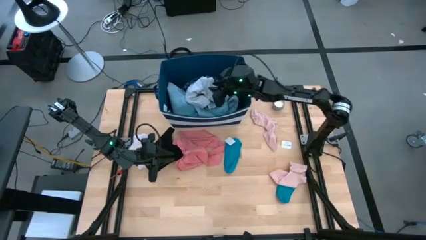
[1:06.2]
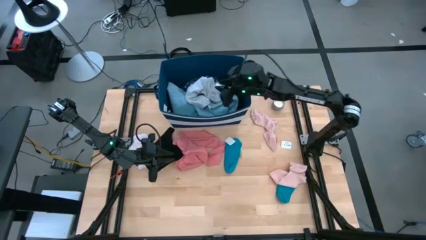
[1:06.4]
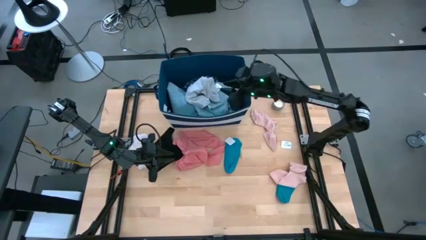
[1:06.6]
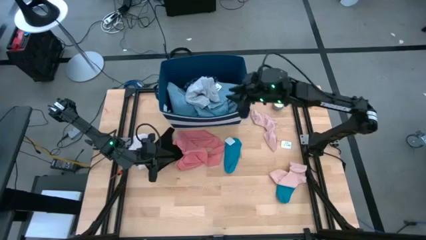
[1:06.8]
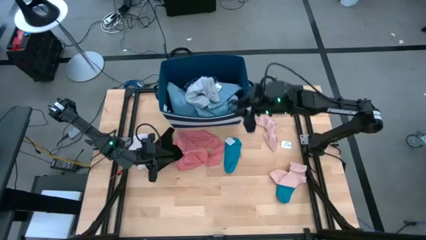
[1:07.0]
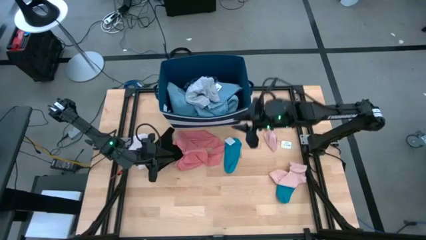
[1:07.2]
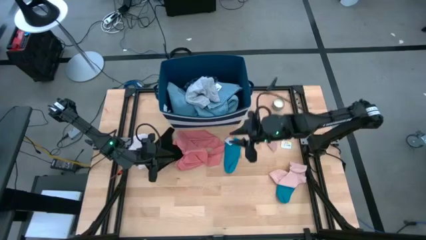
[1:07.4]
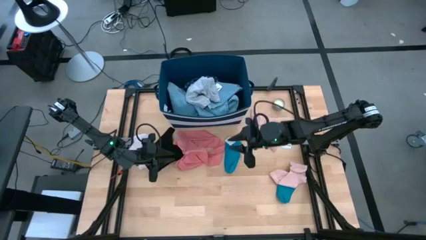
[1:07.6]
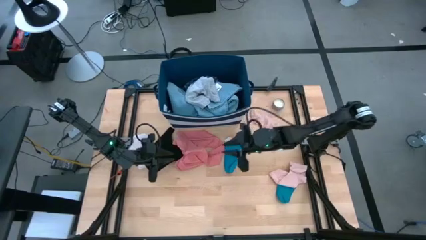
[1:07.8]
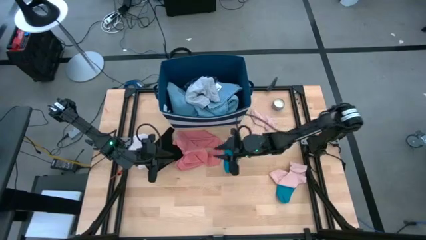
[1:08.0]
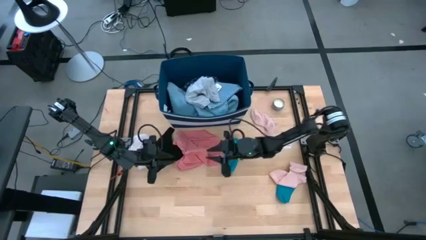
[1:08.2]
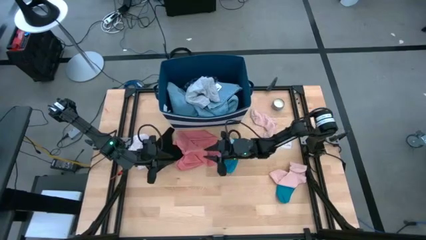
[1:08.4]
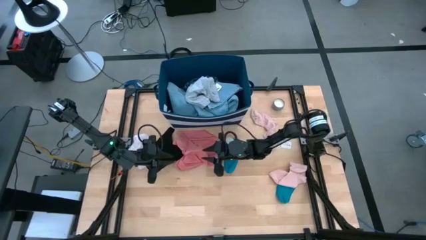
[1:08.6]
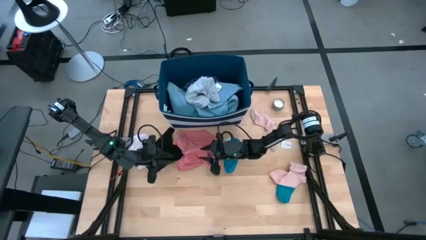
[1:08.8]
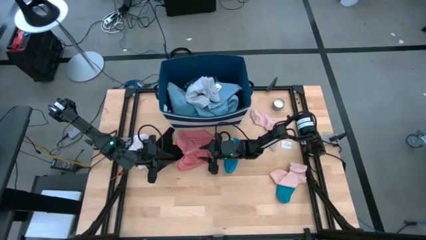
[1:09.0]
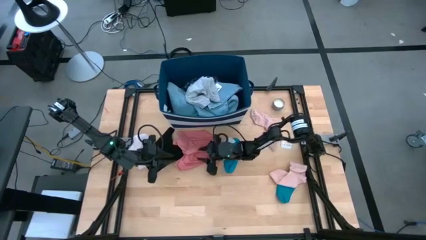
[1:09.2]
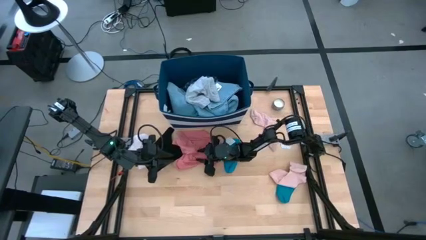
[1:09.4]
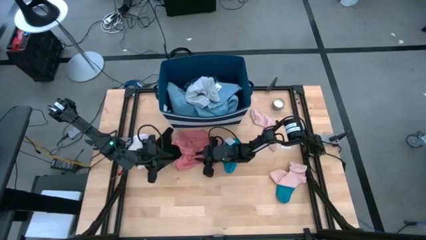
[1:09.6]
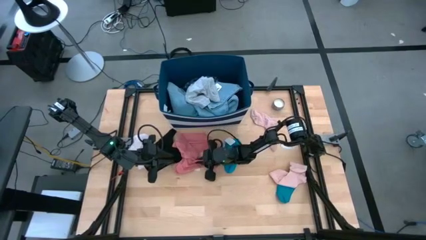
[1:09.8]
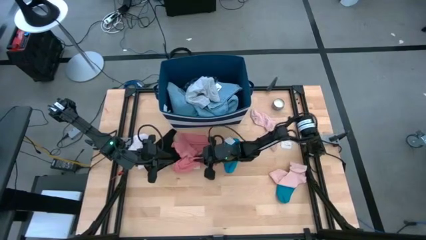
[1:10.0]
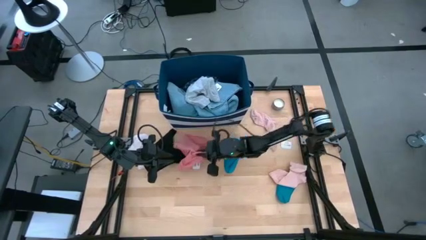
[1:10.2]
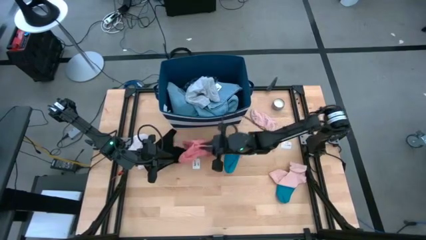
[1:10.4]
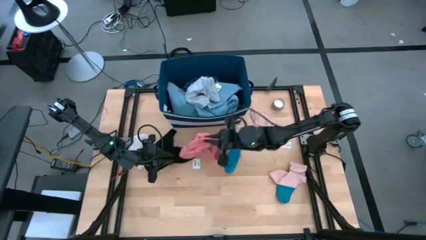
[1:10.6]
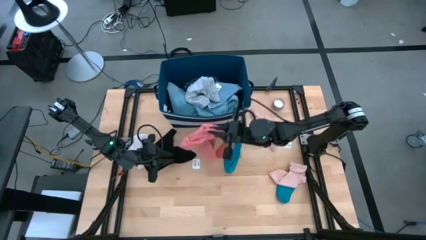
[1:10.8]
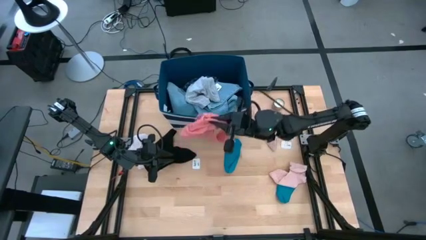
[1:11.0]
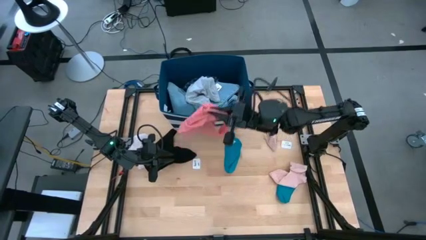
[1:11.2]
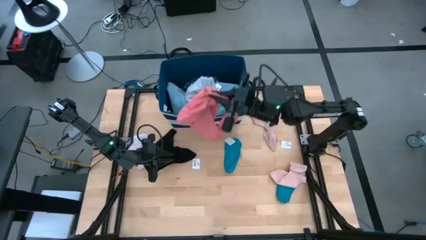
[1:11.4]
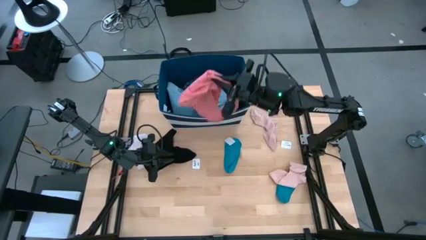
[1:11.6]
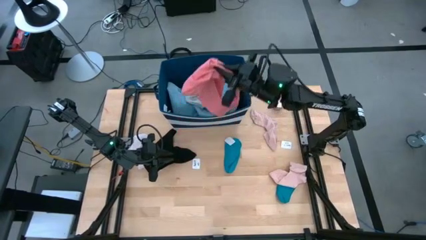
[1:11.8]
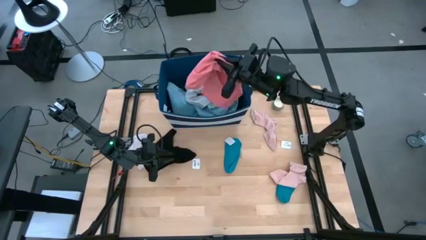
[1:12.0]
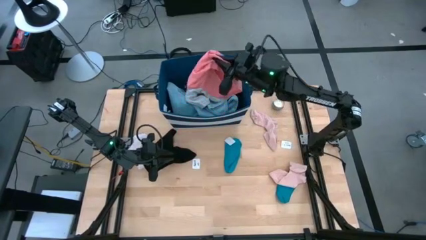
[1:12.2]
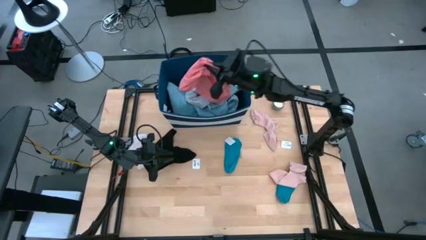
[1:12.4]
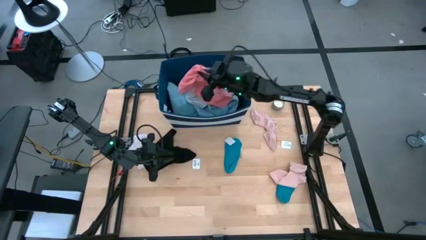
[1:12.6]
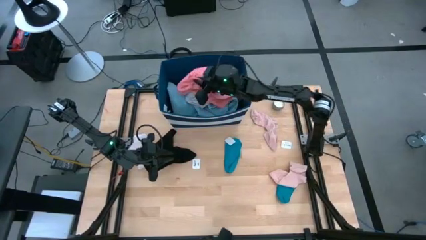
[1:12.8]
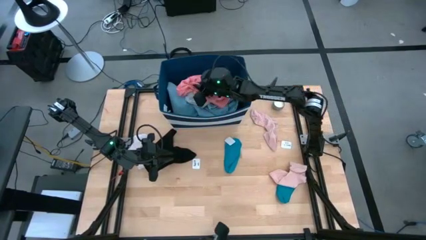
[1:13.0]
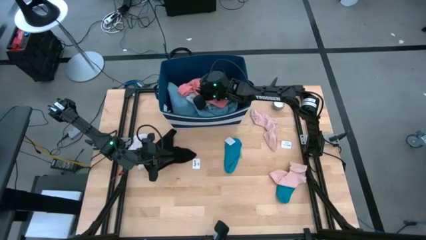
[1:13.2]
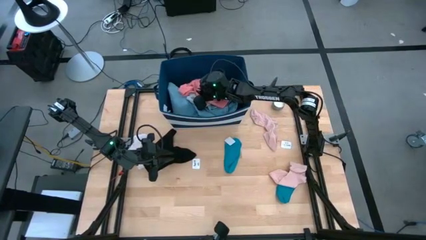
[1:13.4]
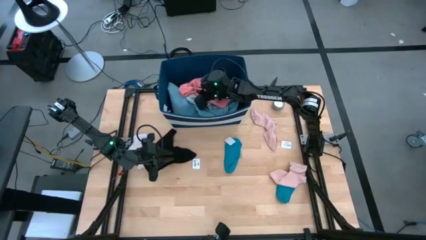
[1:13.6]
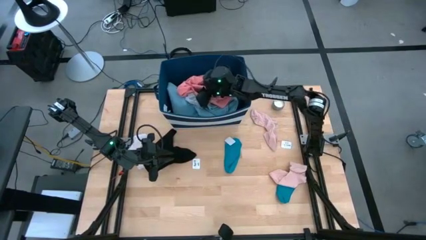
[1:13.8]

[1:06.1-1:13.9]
Task: Sort clothes
Put the pink underwear into the blue bin

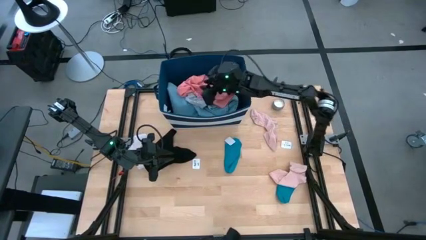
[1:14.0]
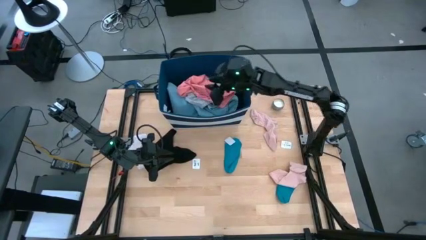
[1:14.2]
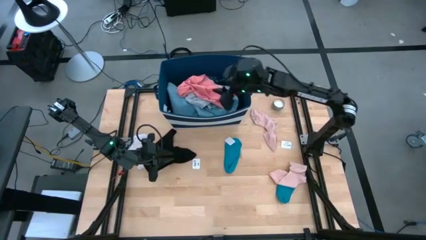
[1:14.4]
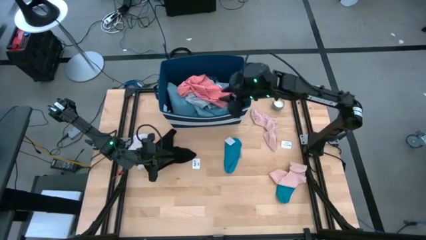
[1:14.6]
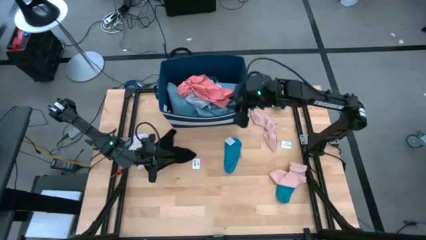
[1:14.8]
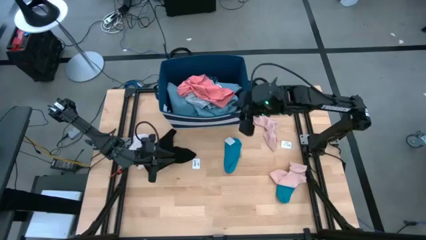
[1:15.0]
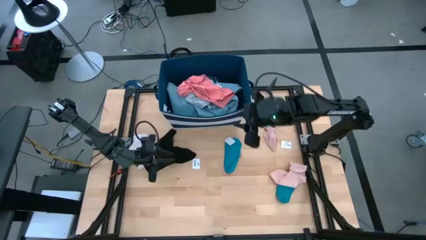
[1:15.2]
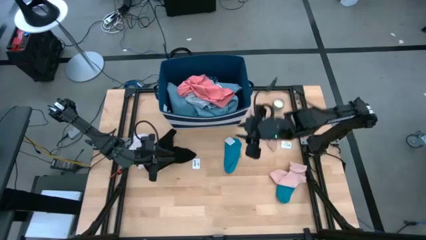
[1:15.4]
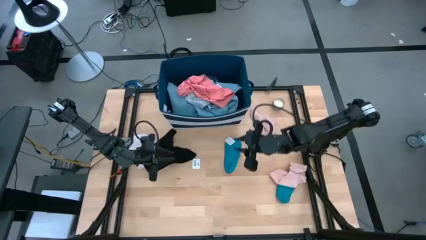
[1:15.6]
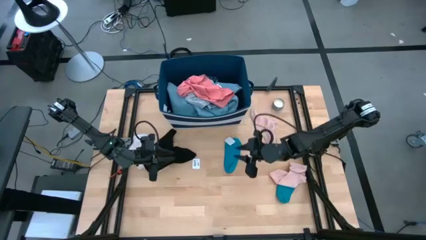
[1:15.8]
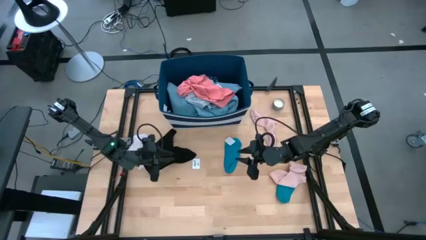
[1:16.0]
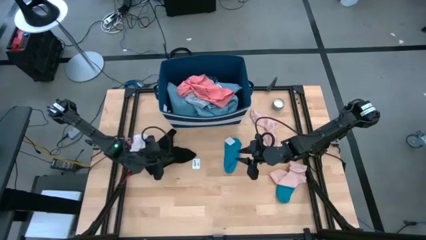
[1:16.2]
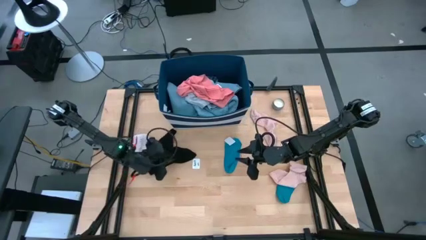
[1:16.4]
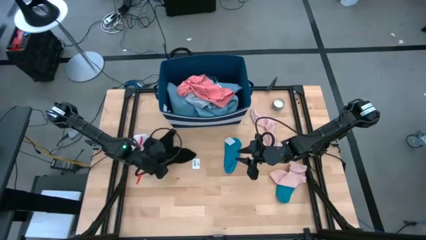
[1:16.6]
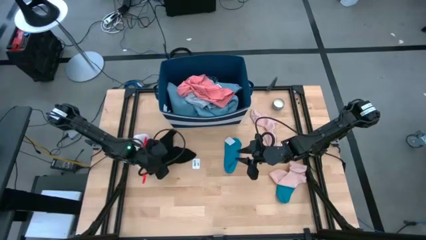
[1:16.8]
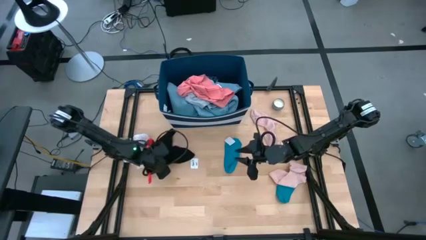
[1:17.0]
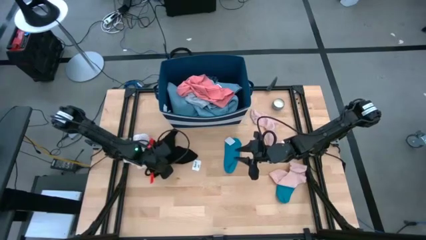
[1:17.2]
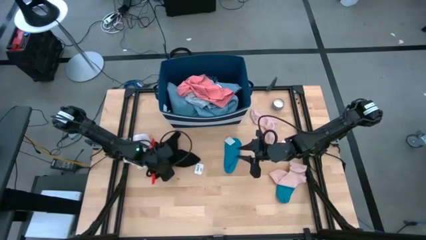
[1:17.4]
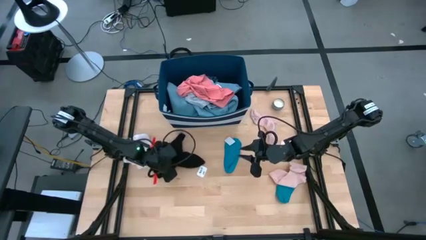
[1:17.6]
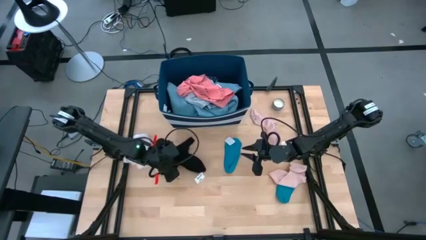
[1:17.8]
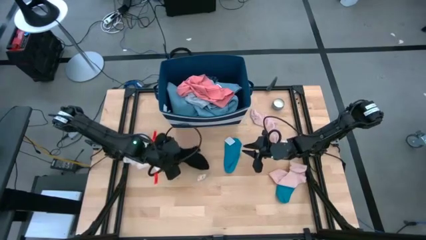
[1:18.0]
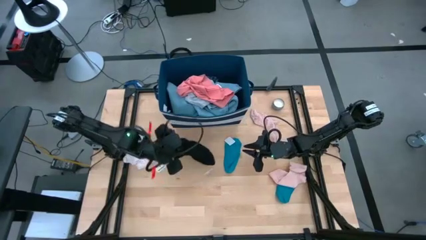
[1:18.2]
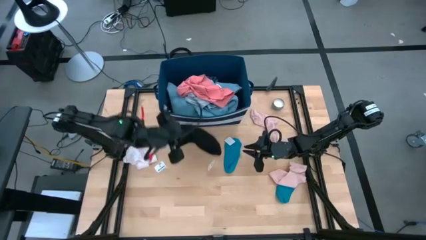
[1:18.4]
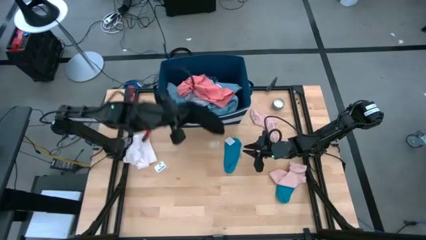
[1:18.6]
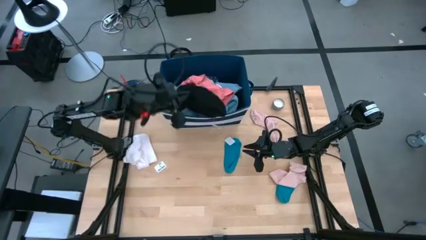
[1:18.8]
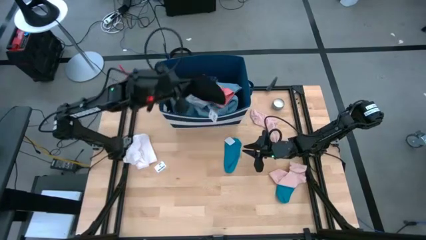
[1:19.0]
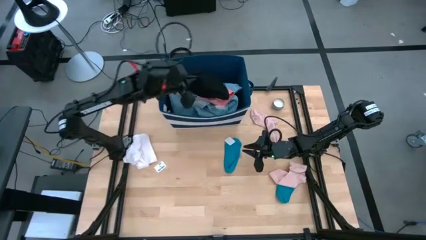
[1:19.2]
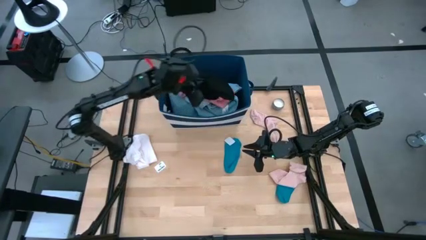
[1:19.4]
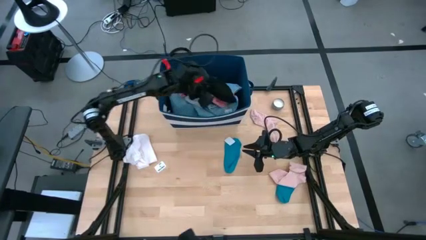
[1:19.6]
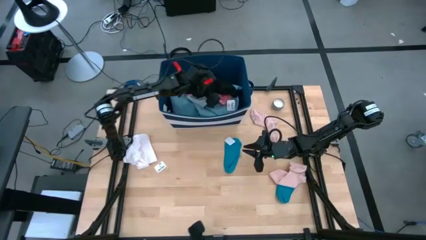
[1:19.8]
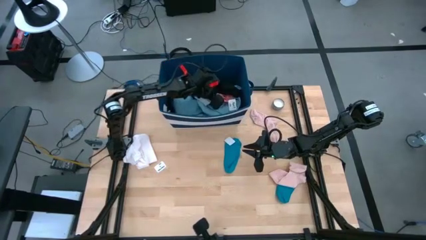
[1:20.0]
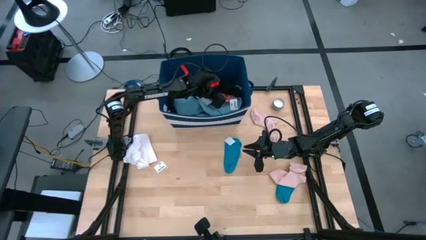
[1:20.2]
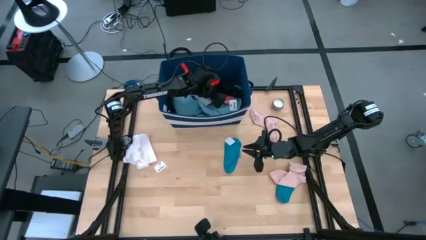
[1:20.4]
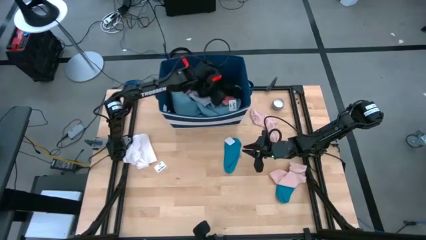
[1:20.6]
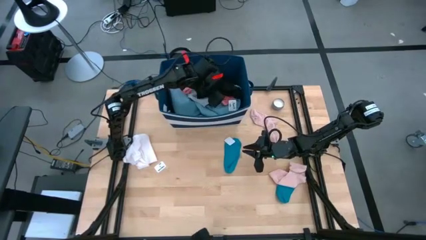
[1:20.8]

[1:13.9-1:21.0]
Put the black underwear into the blue bin
